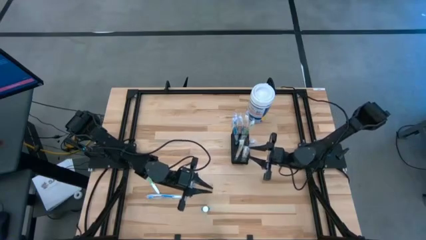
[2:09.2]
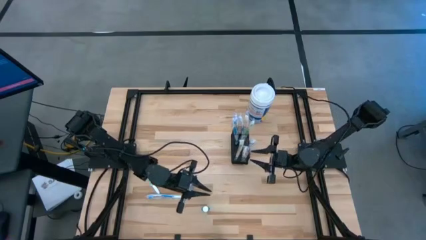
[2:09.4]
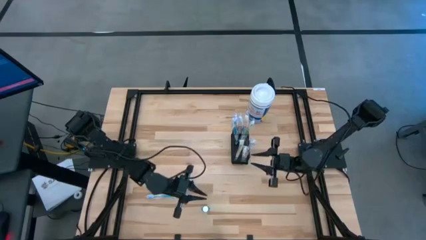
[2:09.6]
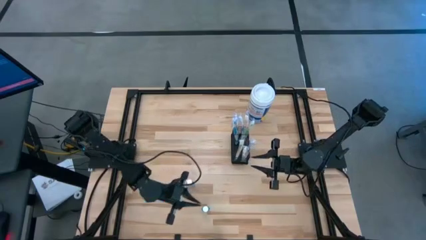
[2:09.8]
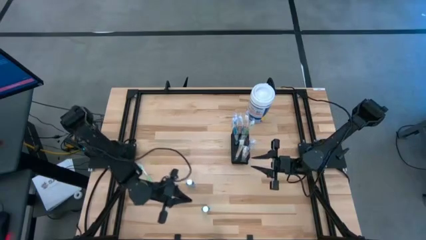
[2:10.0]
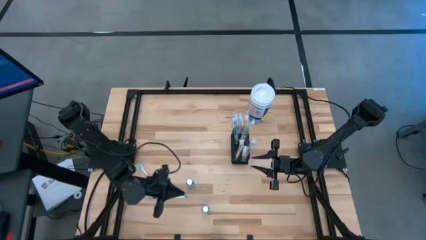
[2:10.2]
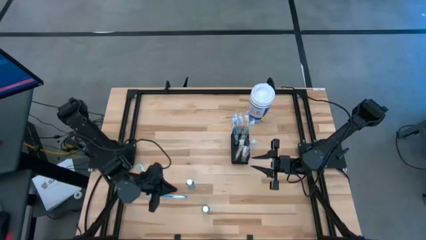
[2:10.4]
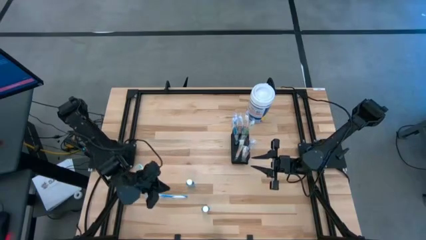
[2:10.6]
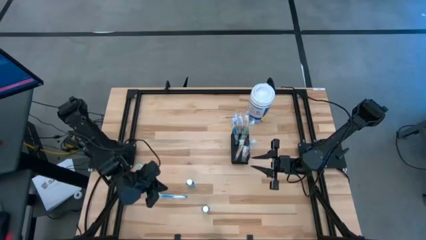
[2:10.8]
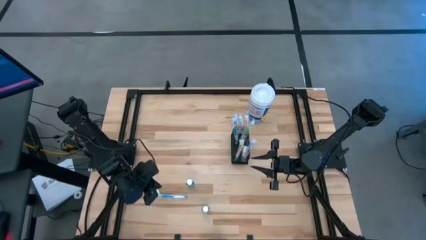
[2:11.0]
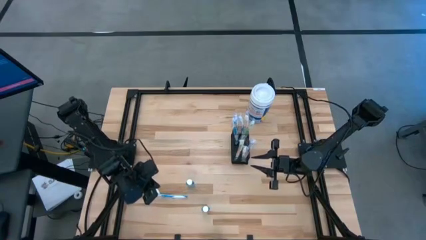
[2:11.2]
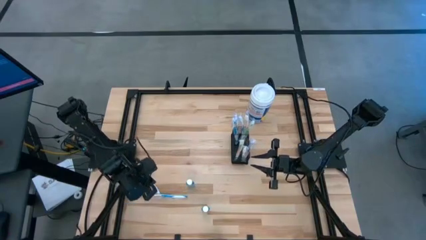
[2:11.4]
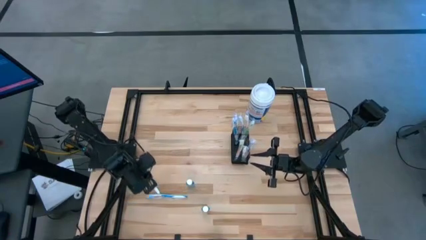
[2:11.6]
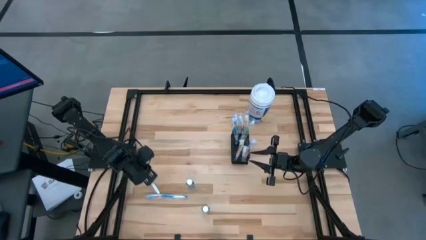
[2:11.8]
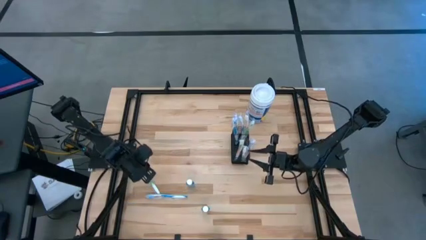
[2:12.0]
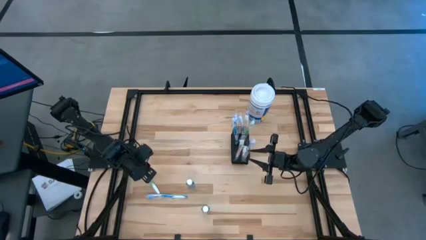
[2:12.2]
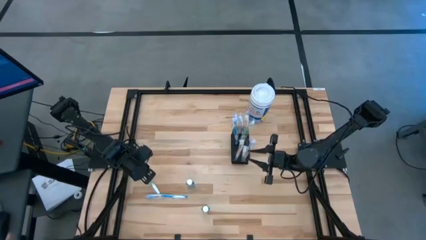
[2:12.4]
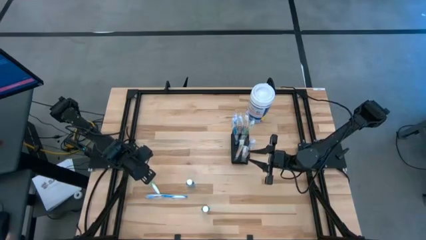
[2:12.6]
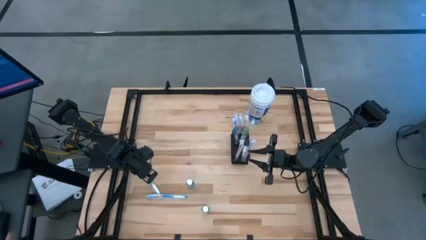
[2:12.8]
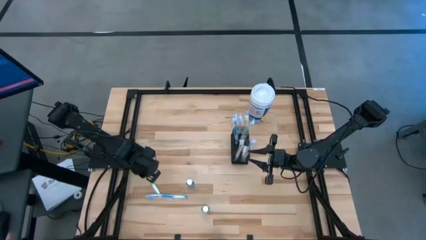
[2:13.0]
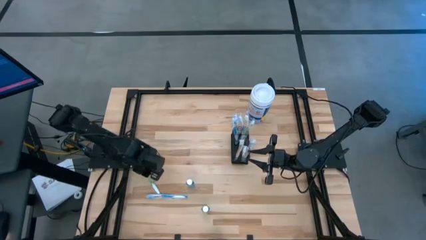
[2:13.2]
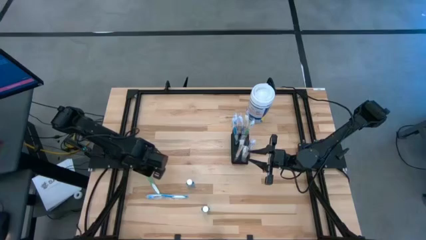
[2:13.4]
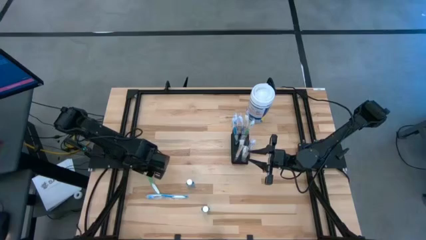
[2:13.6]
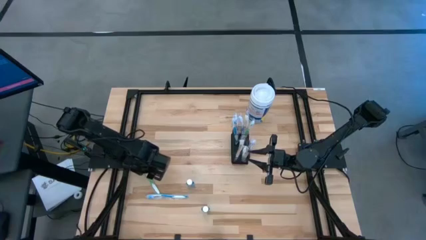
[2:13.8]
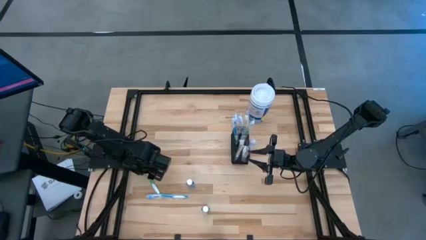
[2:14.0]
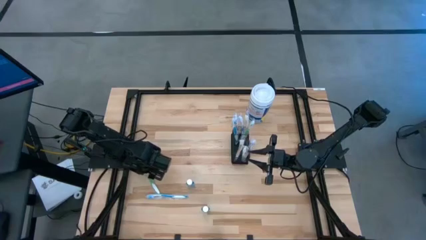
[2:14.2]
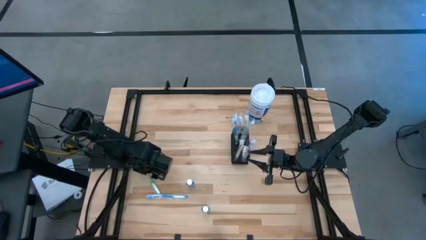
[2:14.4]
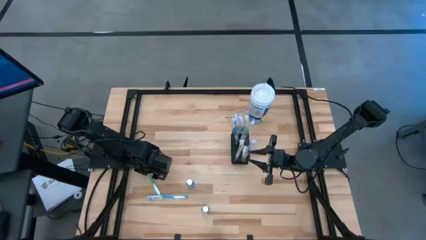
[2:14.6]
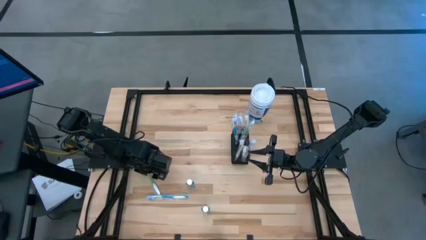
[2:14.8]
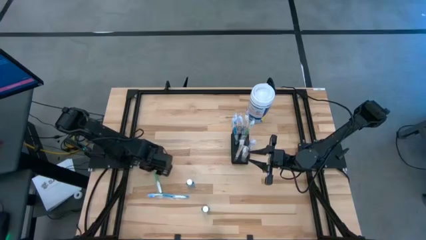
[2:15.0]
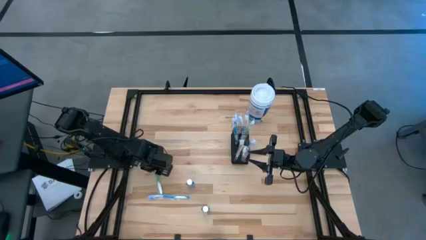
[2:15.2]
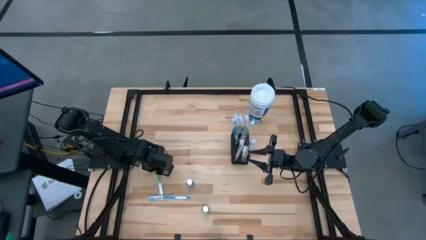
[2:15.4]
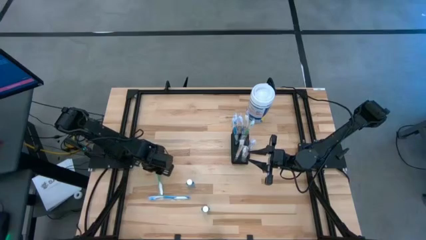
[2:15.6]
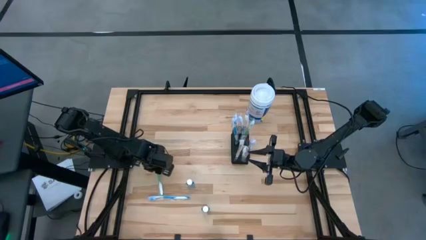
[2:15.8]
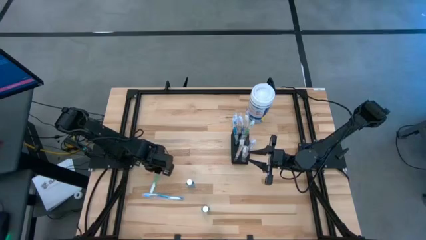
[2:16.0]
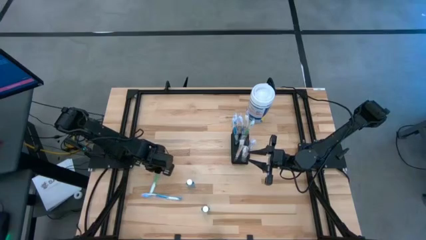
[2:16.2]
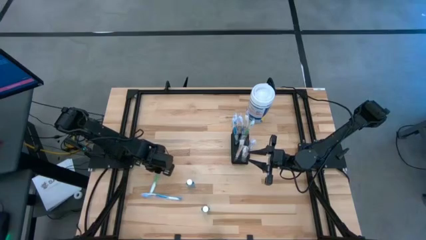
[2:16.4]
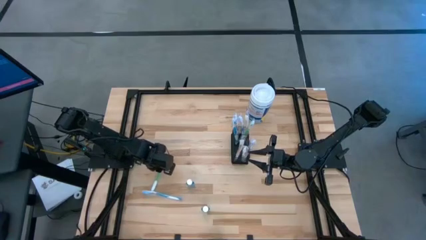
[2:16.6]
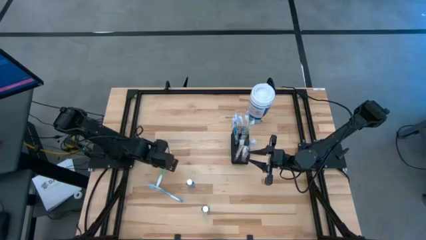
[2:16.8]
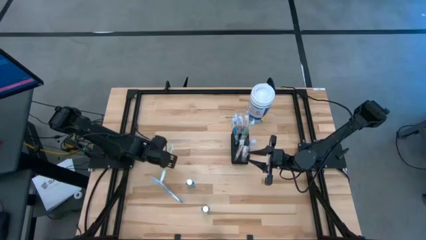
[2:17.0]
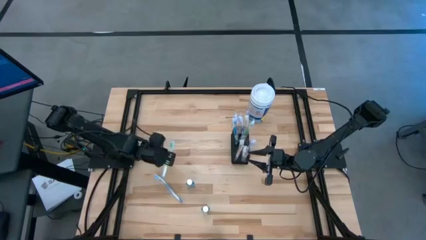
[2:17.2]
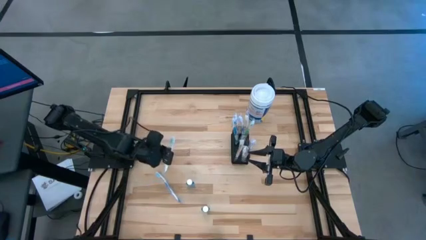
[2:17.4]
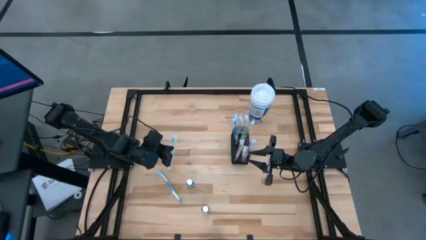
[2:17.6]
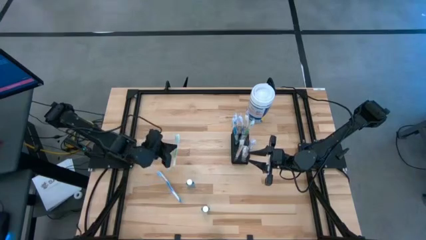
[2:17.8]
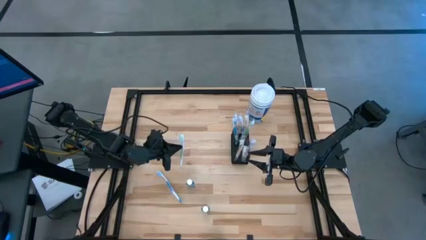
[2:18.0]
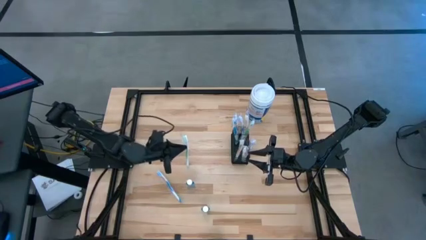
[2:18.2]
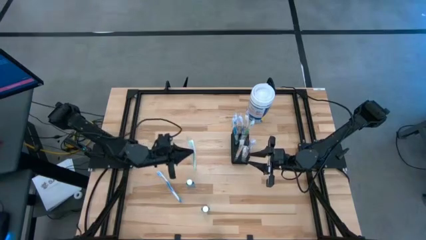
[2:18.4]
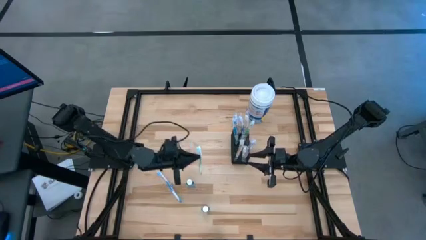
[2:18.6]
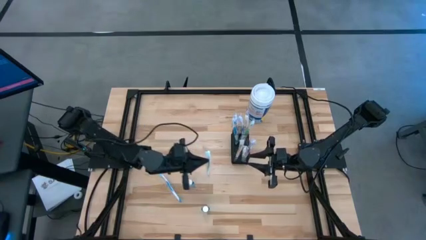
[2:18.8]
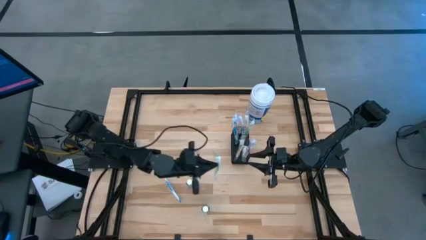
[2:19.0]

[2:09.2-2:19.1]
Task: Pick & Place toothbrushing station
Put the green toothbrush into the wire mesh organizer

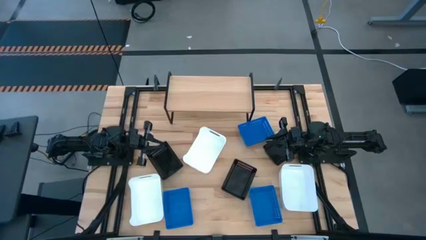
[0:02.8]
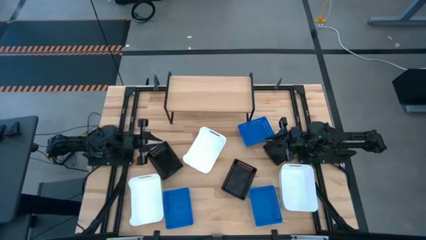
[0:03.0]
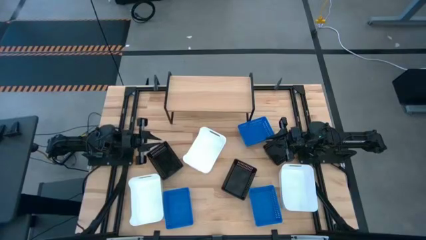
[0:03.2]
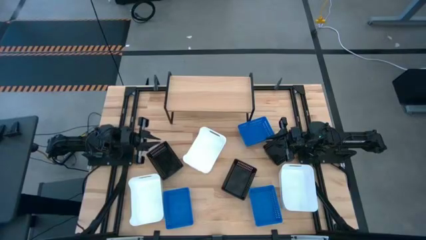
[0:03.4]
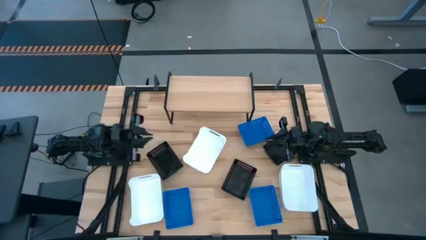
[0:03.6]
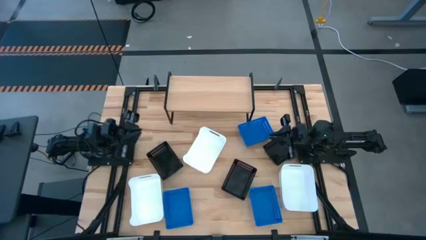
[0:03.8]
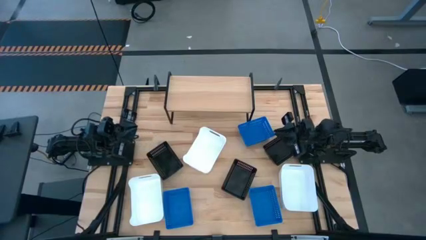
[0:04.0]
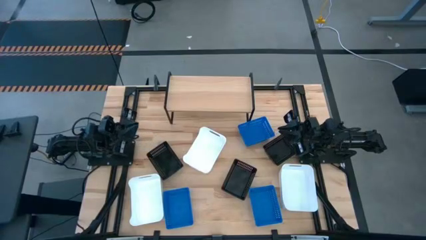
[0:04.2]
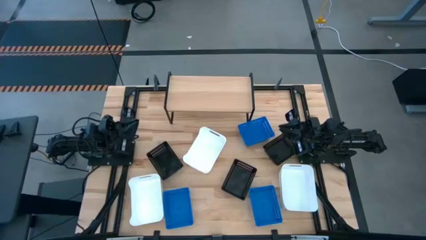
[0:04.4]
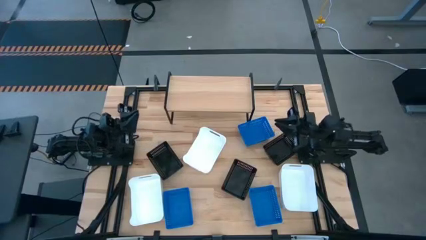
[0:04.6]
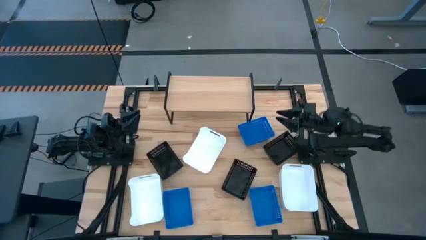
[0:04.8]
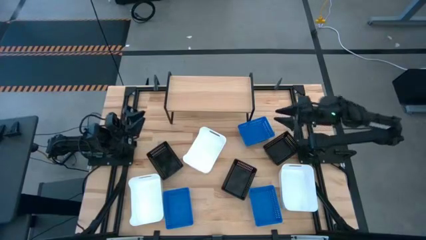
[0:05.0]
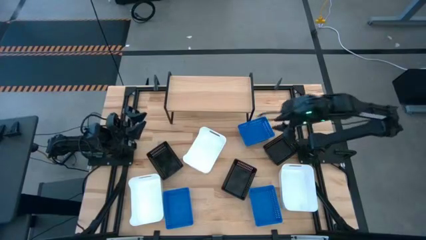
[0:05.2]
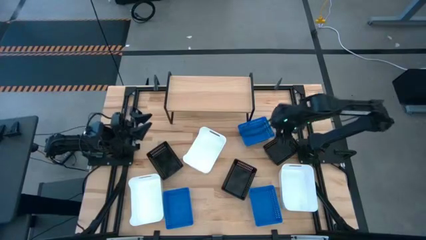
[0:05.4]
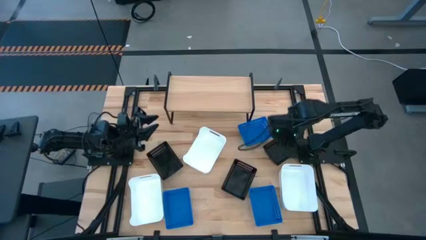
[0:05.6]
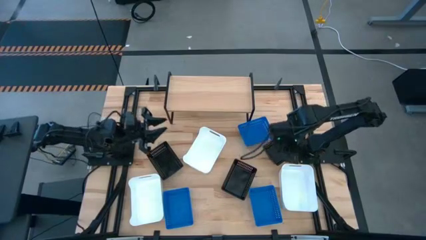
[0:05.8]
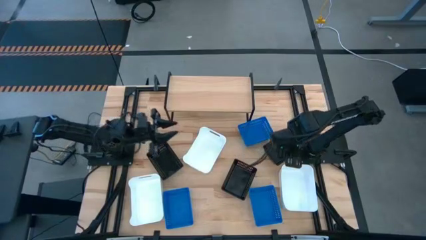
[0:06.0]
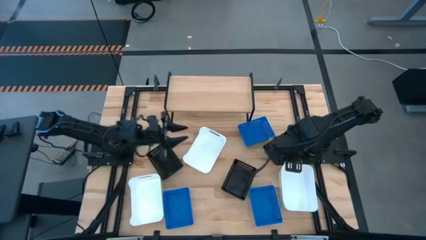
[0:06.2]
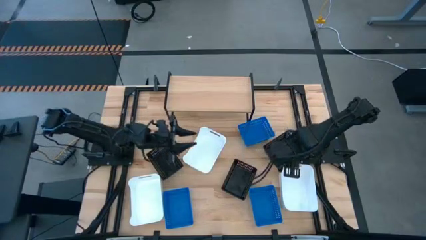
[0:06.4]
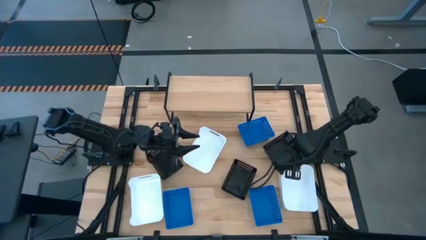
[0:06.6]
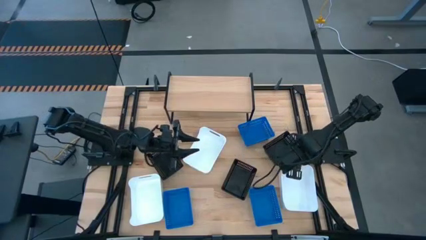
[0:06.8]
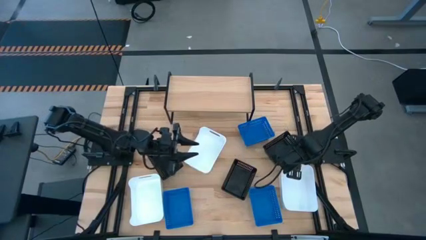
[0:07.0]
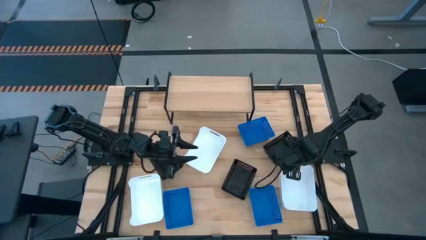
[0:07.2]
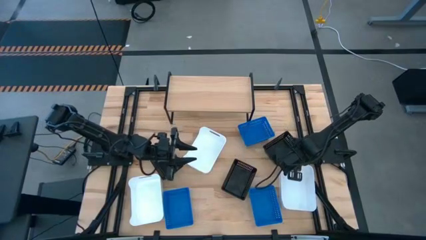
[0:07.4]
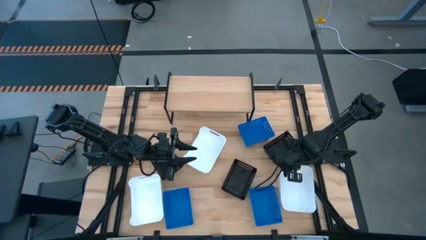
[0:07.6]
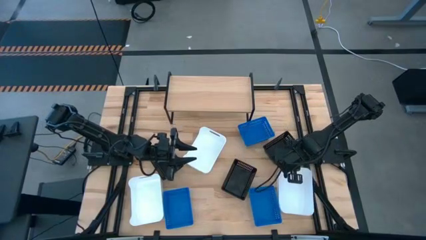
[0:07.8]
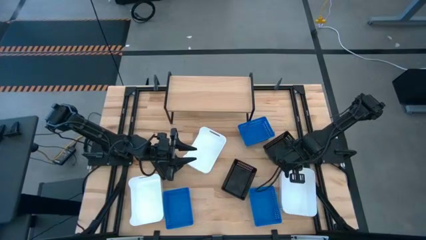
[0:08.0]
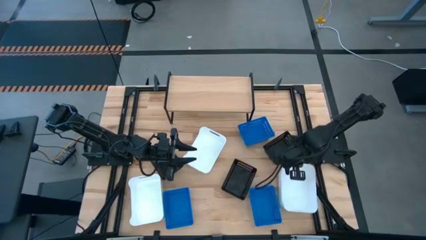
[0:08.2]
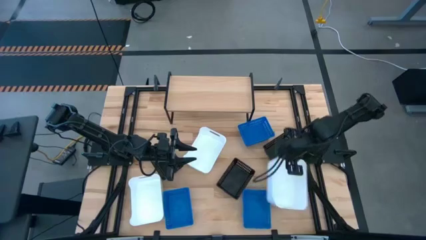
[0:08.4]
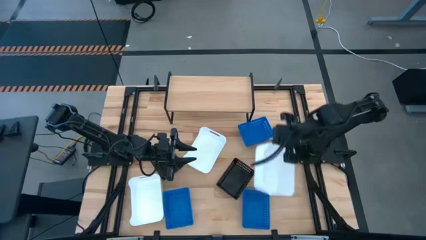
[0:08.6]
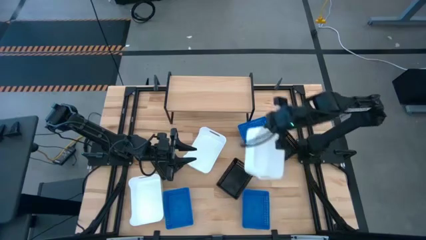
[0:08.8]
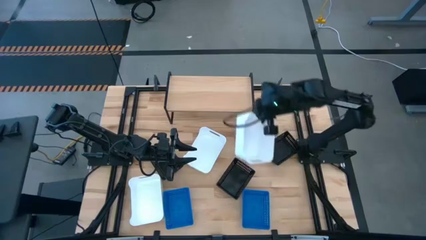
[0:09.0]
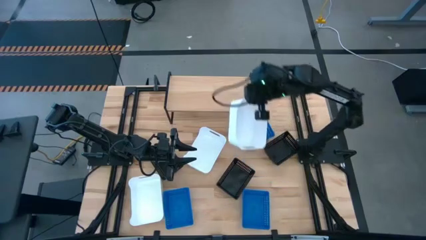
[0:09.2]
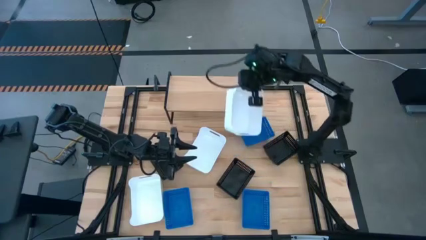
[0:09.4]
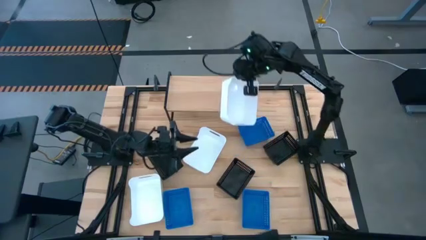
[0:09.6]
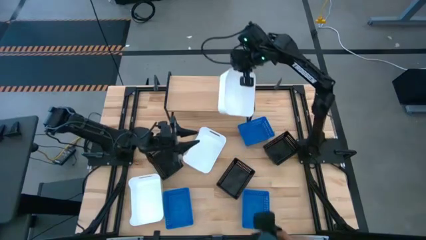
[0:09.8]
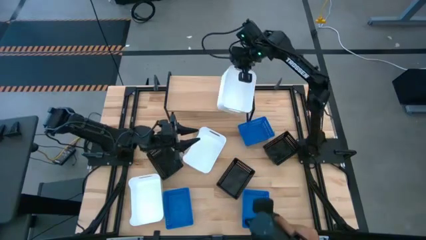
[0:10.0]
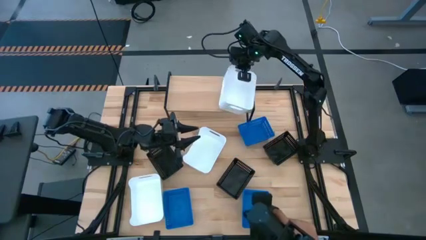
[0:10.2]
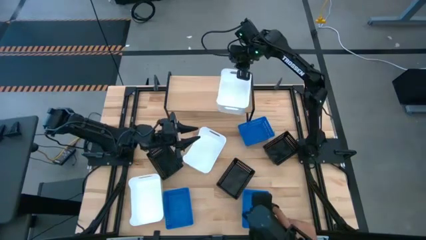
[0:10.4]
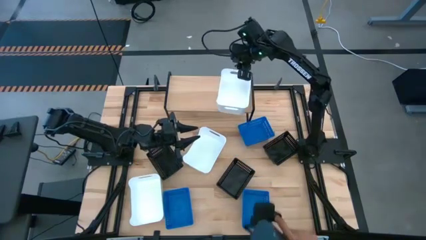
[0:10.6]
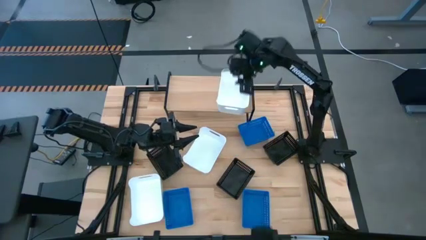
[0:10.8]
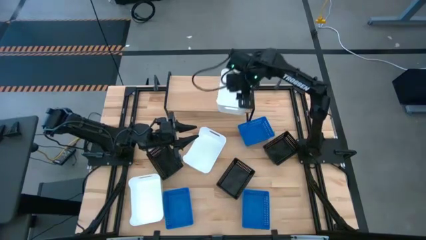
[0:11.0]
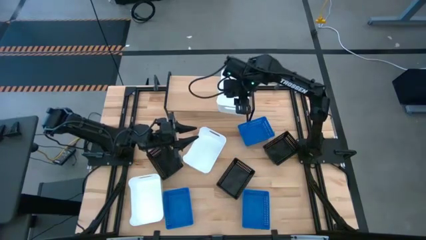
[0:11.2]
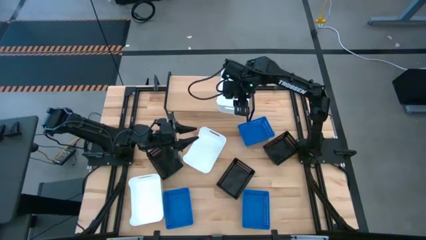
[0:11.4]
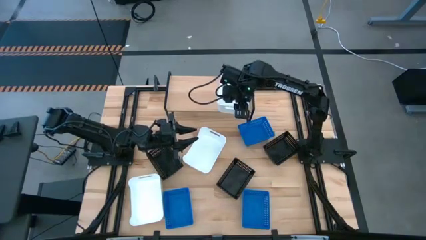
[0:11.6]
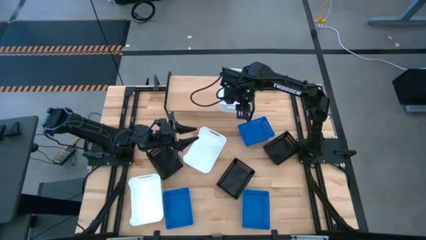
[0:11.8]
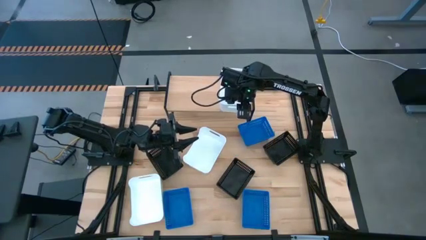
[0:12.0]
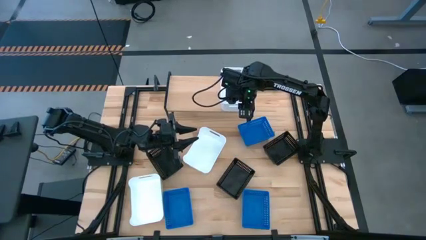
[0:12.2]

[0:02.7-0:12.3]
Task: Stack baskets on shelf by color
Put the right white bin on the shelf
